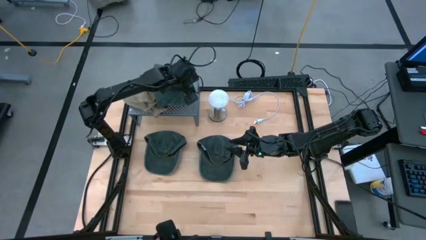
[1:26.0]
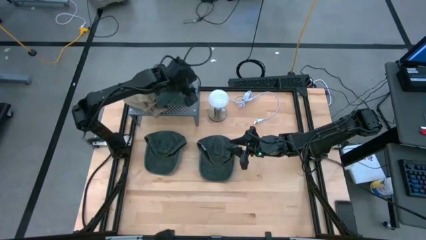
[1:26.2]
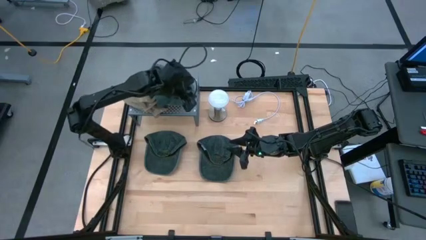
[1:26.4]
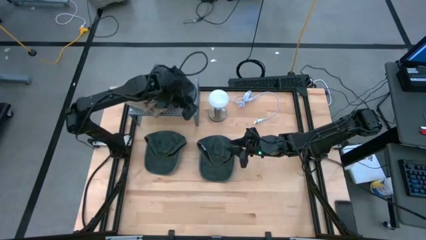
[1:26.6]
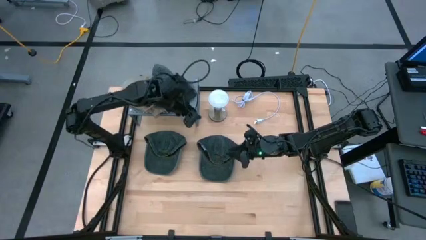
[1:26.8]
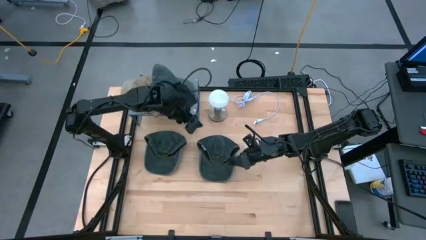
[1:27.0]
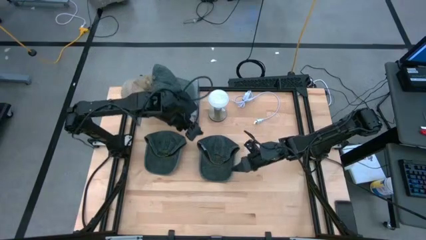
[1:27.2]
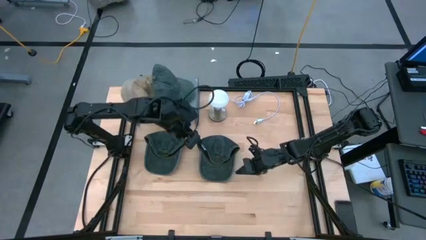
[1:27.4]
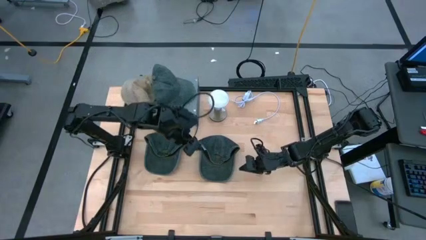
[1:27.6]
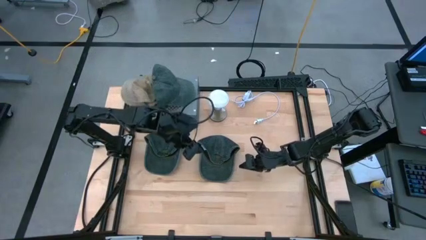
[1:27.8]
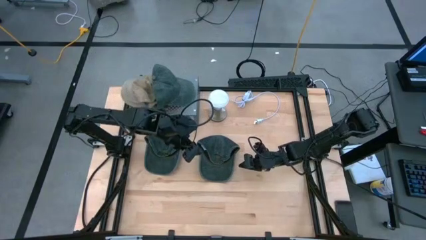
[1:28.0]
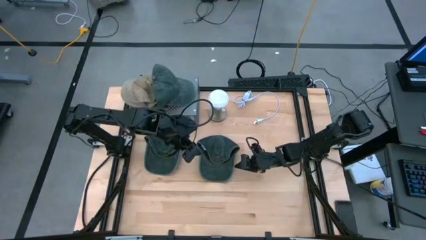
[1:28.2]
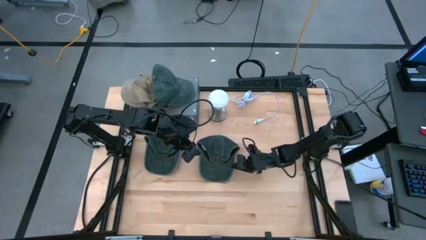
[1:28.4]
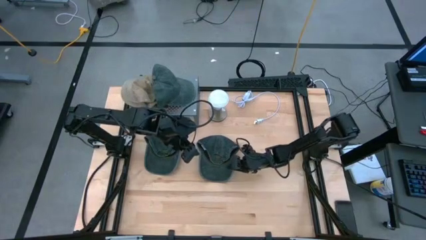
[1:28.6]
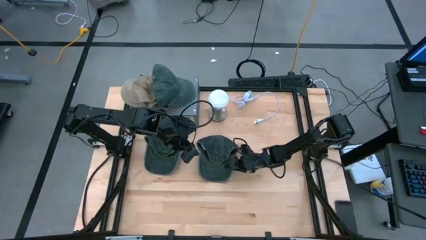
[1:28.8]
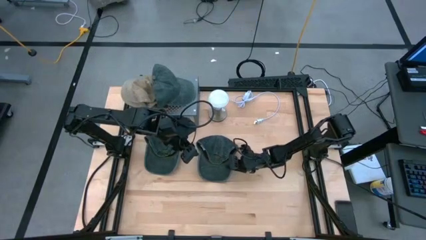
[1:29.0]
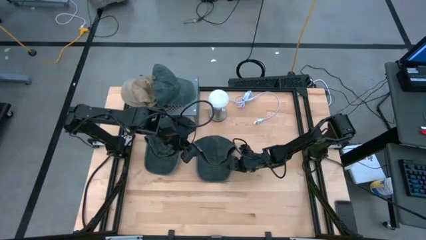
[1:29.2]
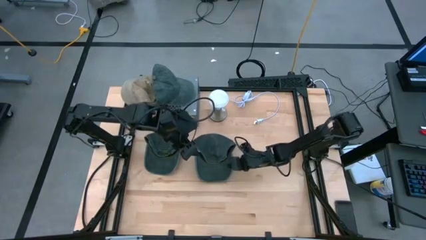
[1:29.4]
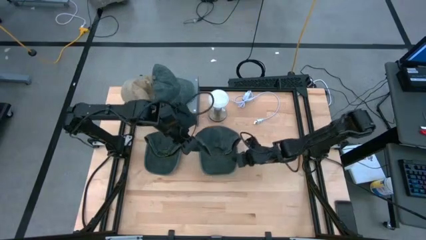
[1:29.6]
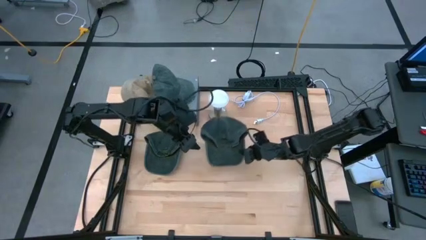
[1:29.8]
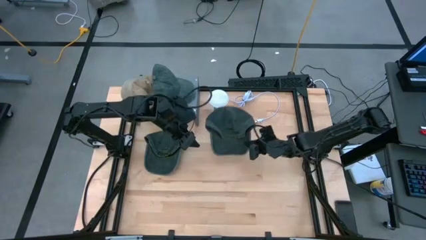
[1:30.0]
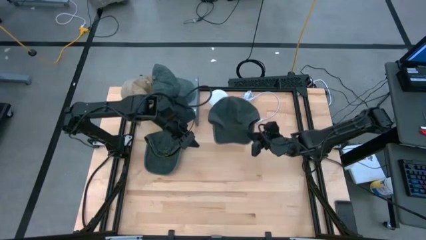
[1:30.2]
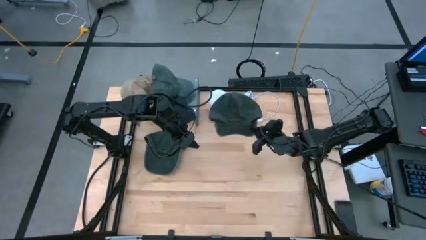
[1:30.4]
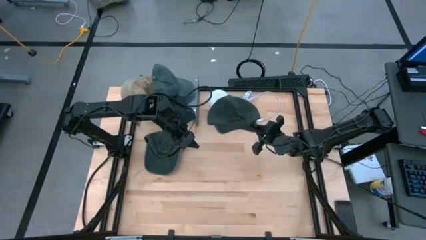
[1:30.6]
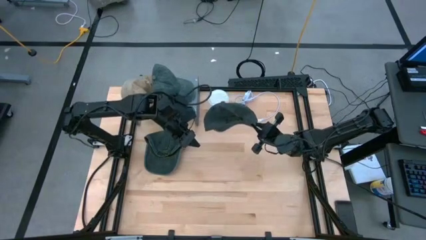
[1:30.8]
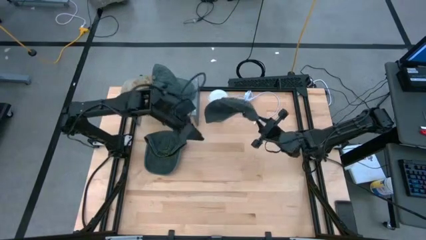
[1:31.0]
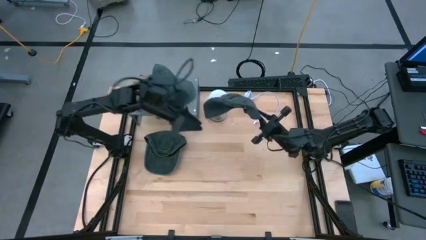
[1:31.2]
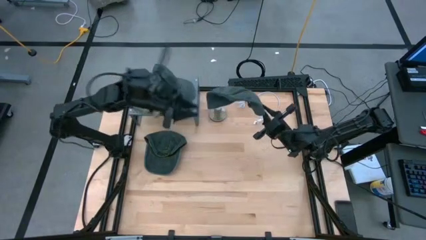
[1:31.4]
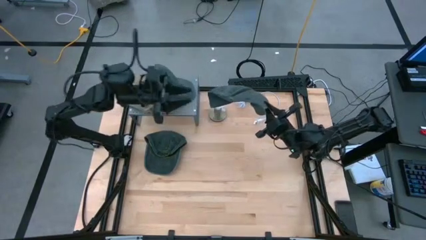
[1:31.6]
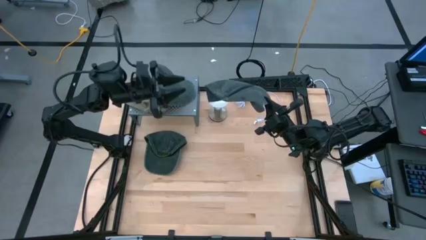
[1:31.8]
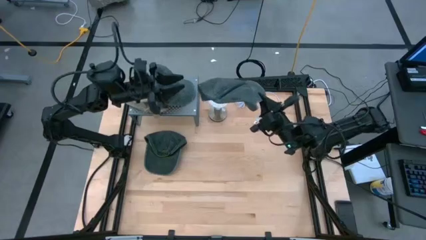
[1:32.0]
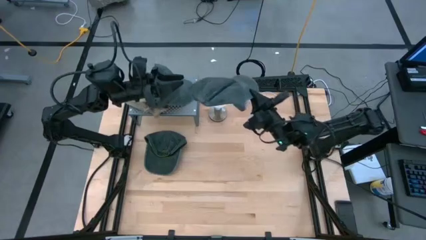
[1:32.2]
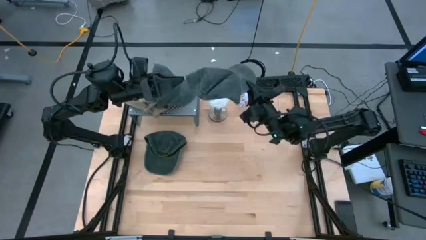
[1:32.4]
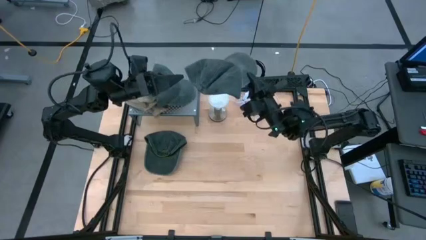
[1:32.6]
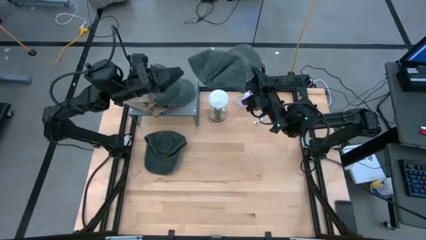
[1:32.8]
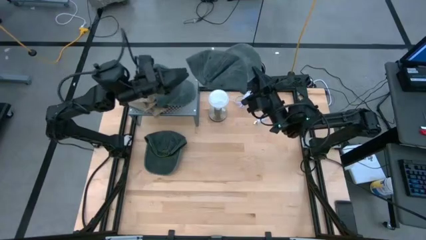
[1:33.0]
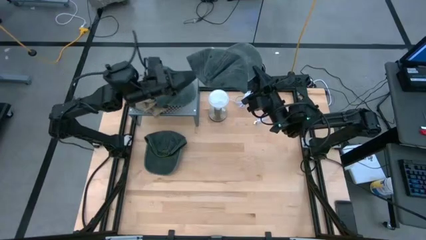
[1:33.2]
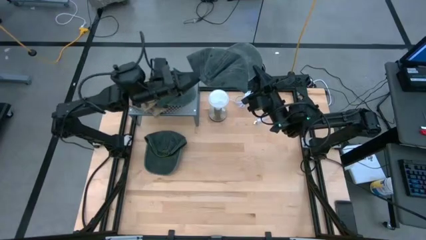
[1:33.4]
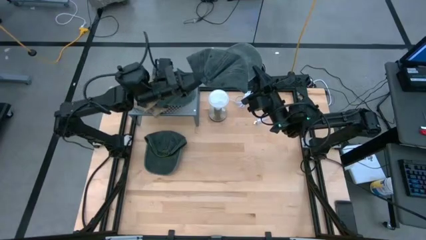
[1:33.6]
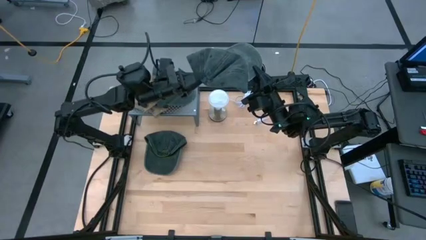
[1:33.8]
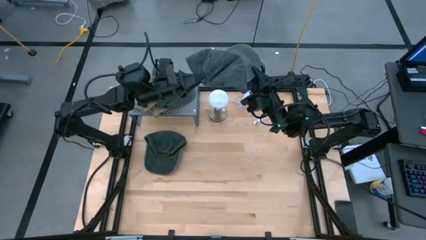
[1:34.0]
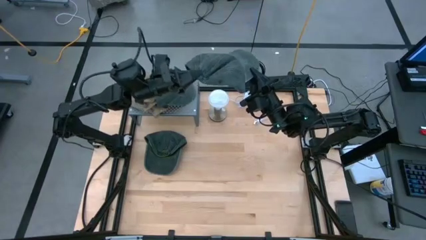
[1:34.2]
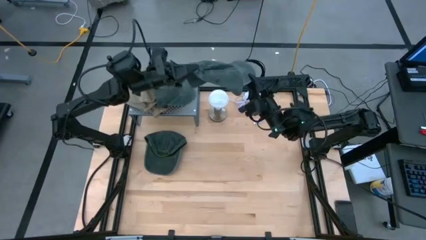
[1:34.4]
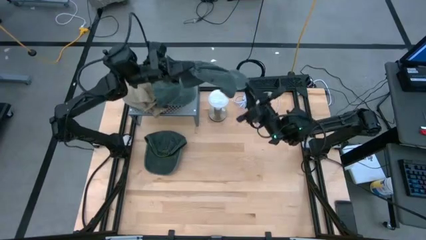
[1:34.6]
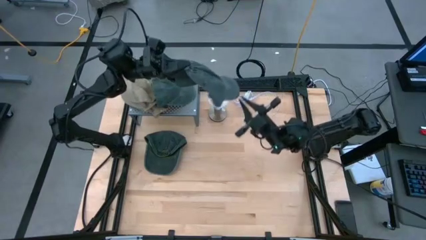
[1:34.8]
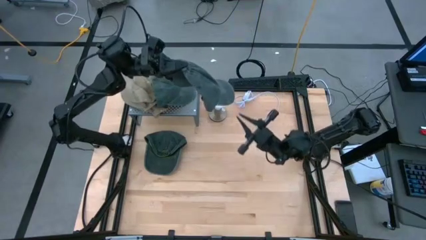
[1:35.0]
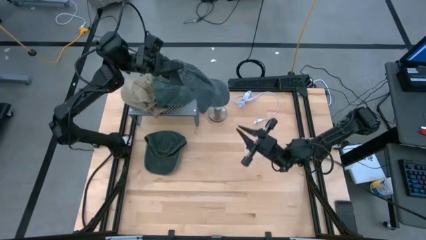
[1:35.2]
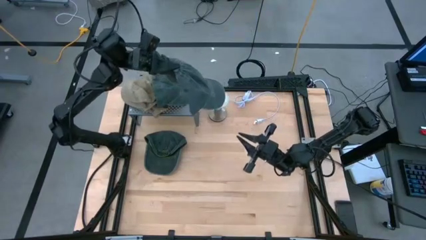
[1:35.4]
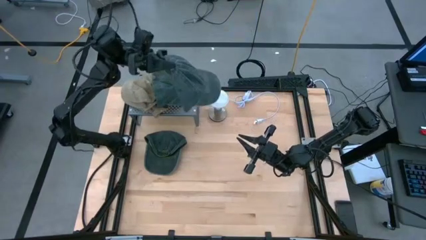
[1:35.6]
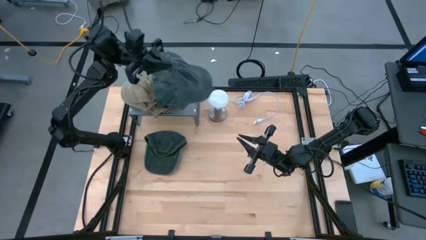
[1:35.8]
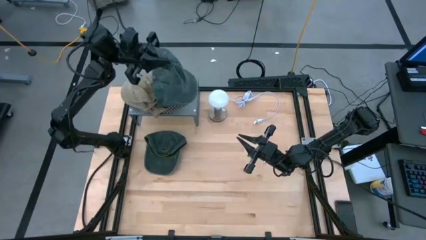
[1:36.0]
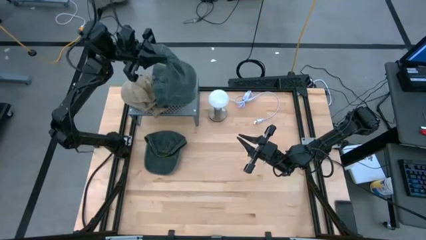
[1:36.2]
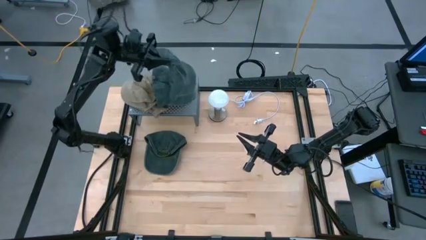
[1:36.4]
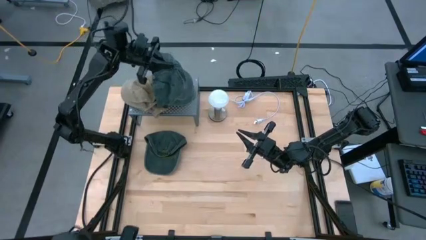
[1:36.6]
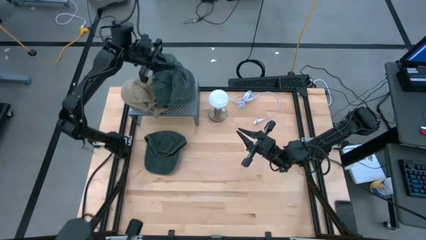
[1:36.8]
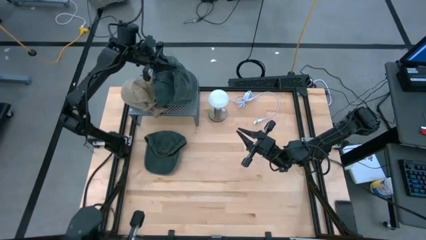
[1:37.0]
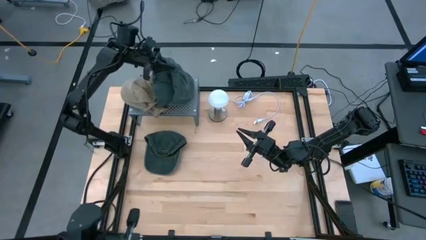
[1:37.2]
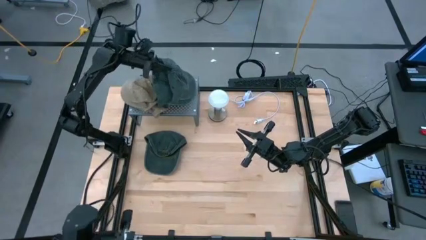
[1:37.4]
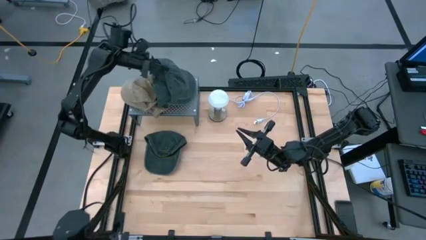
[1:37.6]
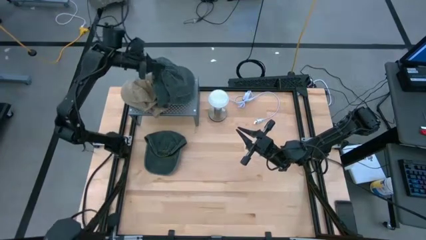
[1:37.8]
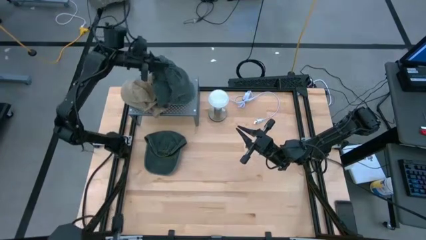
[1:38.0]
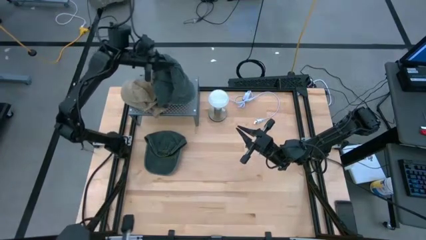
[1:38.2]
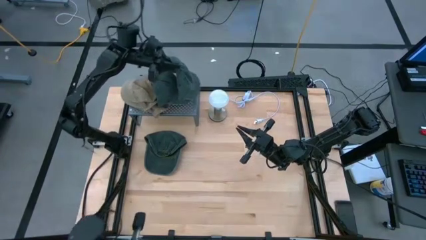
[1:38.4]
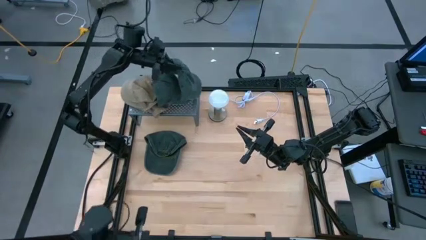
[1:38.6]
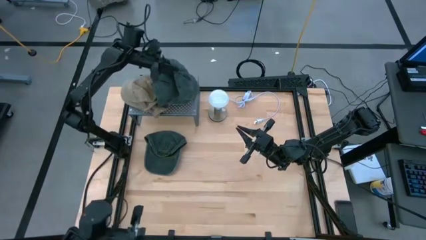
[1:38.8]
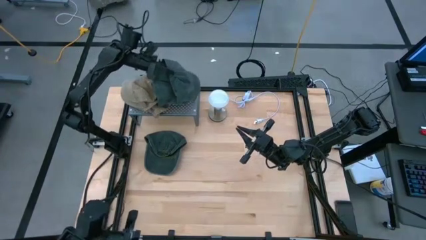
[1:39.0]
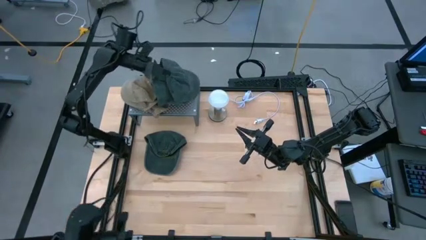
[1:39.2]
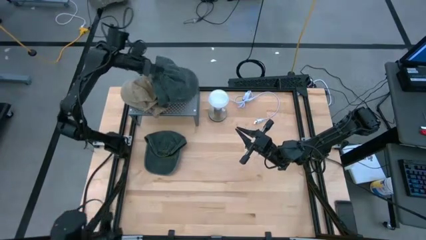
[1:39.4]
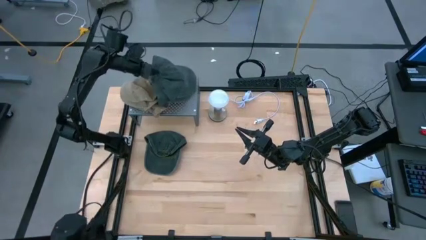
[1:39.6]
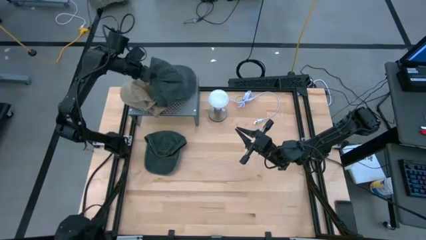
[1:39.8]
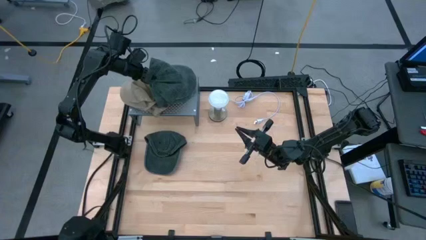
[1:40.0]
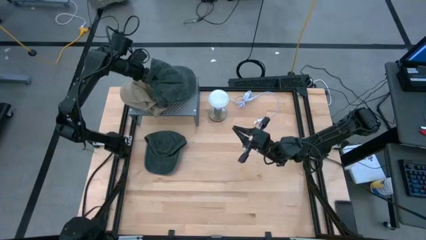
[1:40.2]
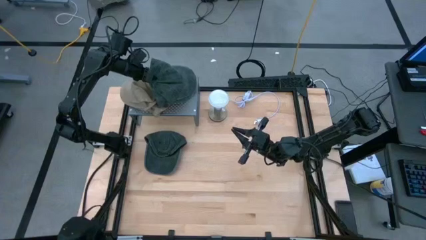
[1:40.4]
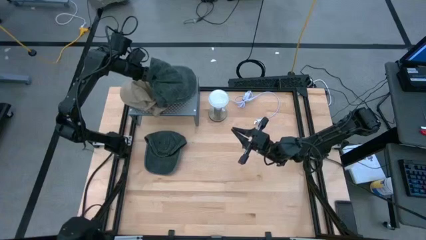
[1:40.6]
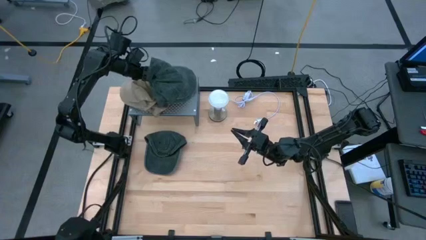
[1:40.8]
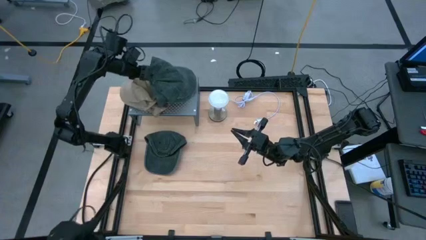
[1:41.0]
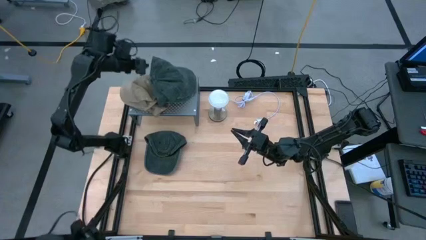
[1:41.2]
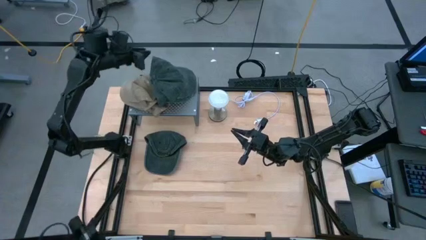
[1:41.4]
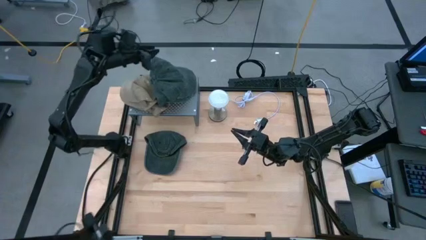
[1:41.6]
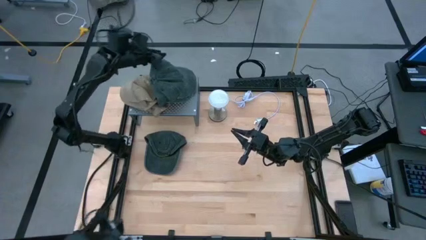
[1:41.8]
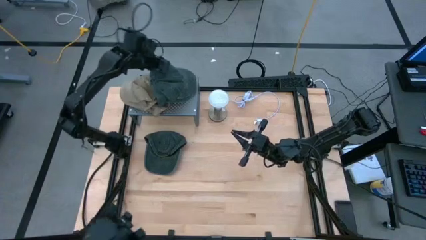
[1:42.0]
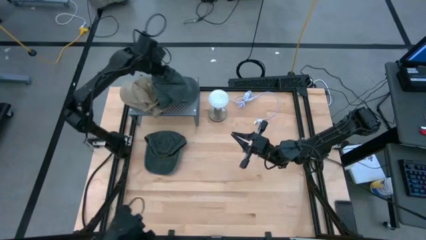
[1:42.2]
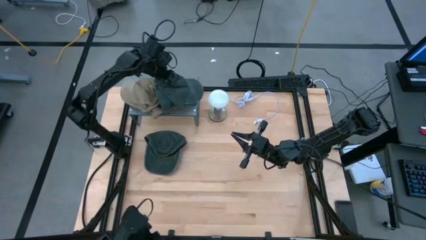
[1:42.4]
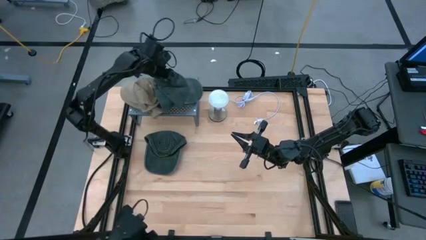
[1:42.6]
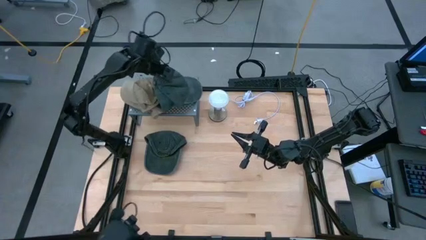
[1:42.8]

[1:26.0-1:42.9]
Task: Pick & Place hat
Stack the right black cap on the black cap on the shelf

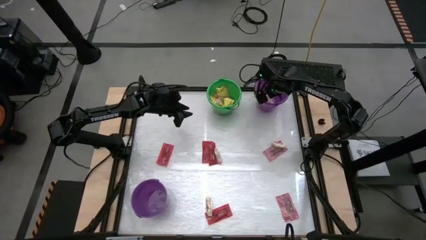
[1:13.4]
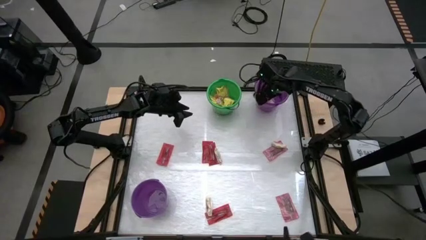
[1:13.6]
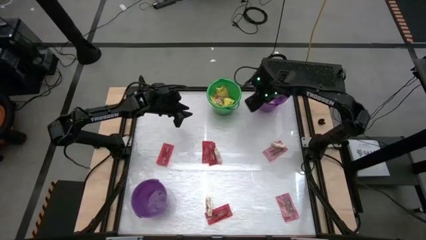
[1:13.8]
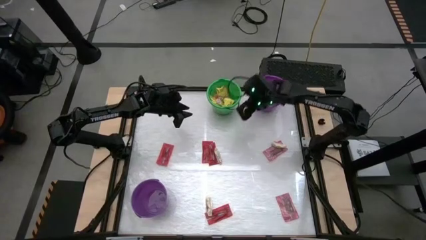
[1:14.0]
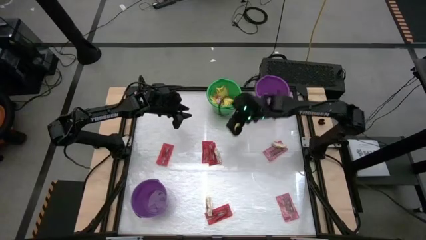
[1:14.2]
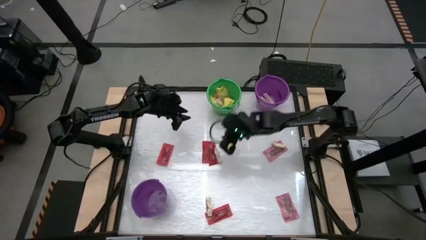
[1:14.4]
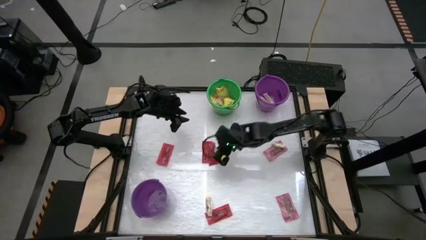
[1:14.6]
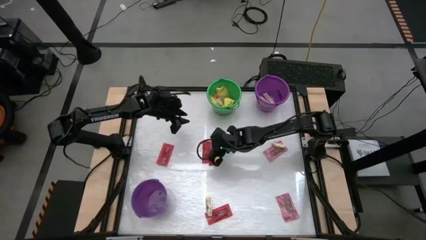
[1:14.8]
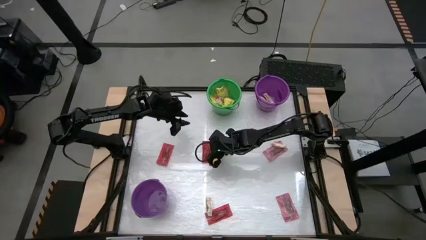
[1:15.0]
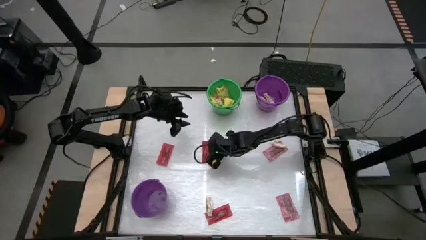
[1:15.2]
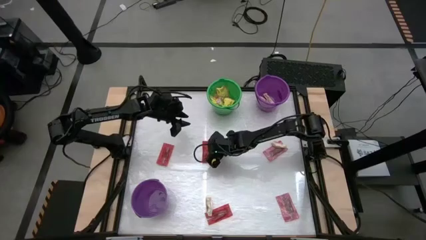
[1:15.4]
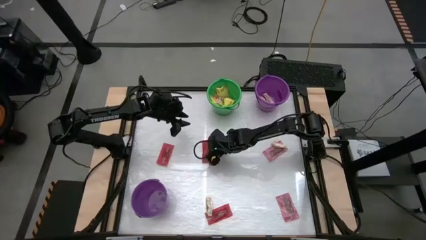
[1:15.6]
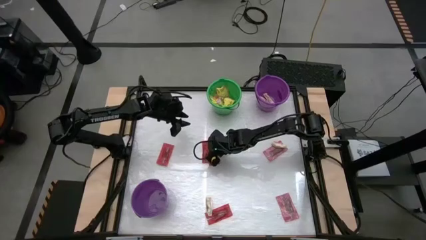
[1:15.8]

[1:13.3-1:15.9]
Task: Sort candy by brand, put in halloween buckets
Put the light brown chocolate bar into the top violet bucket
